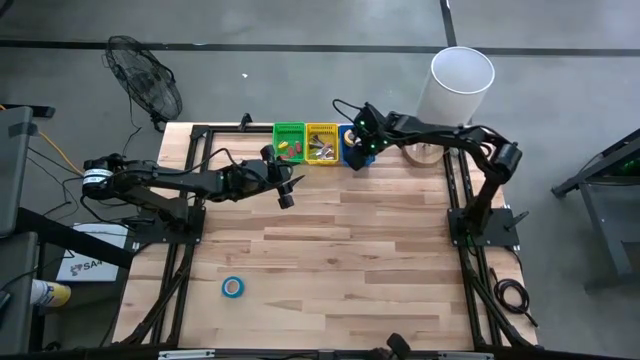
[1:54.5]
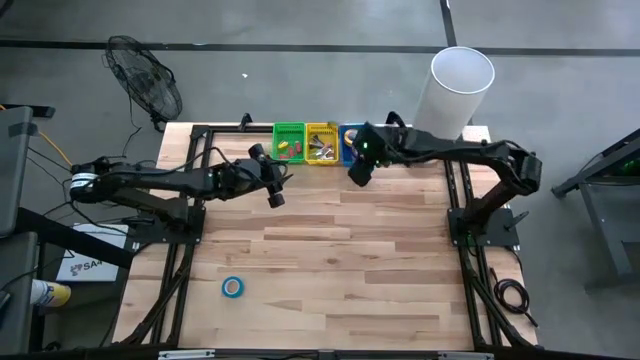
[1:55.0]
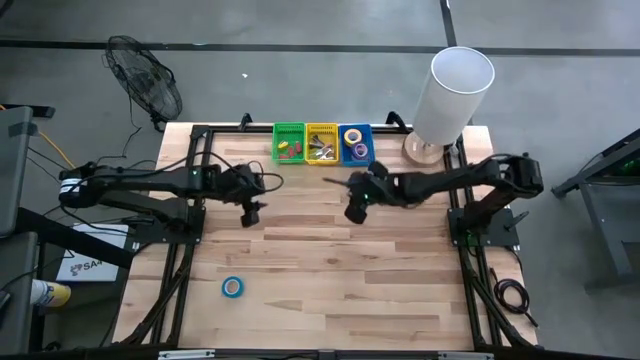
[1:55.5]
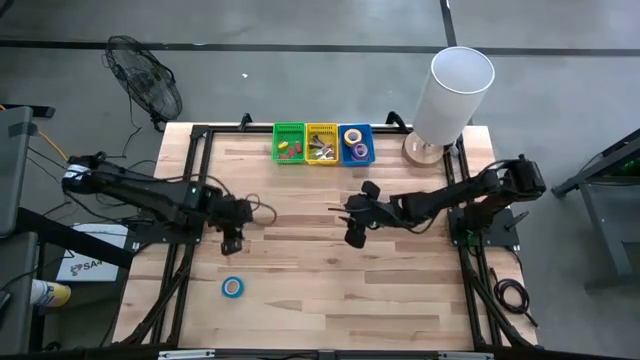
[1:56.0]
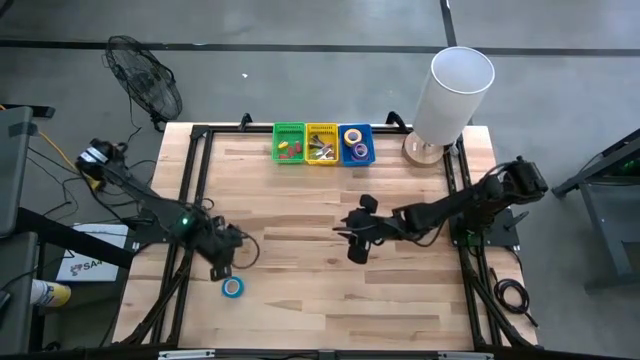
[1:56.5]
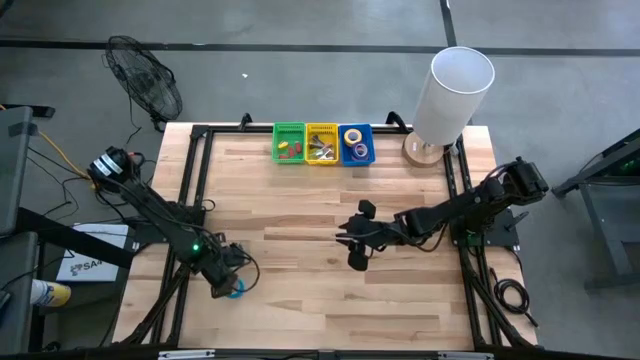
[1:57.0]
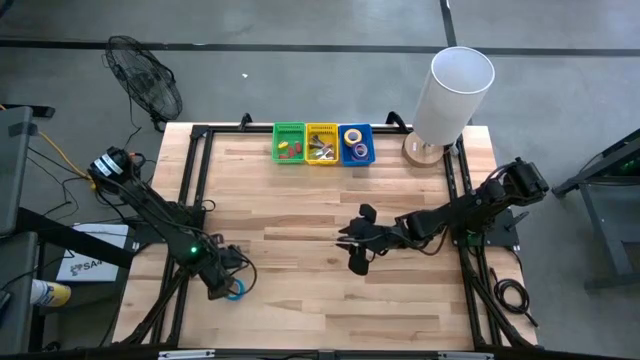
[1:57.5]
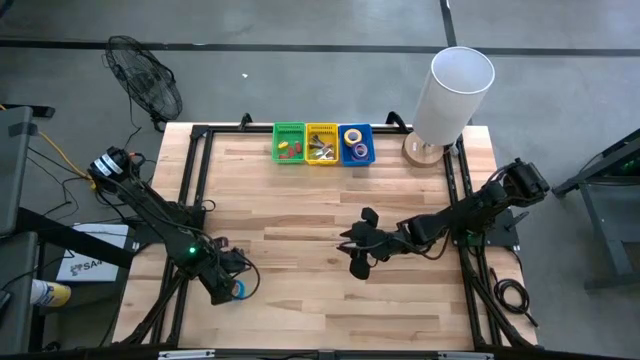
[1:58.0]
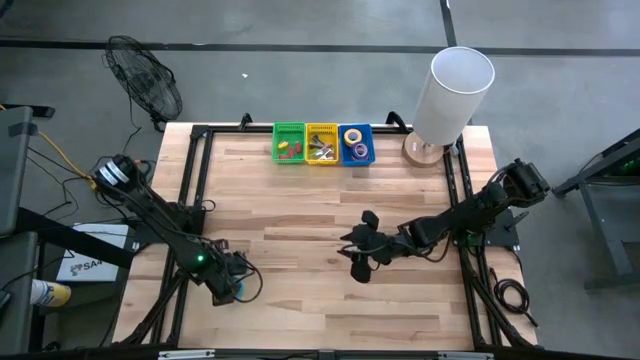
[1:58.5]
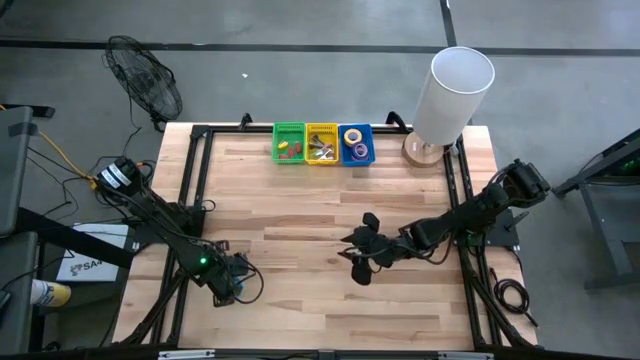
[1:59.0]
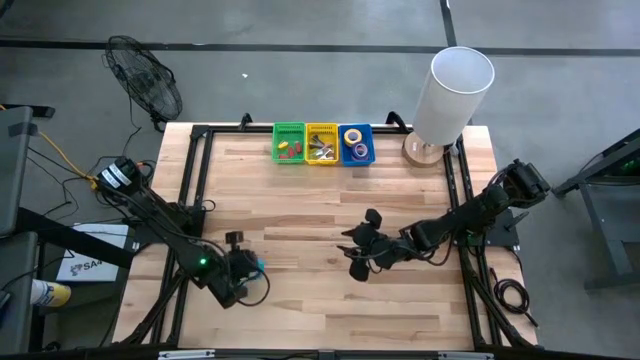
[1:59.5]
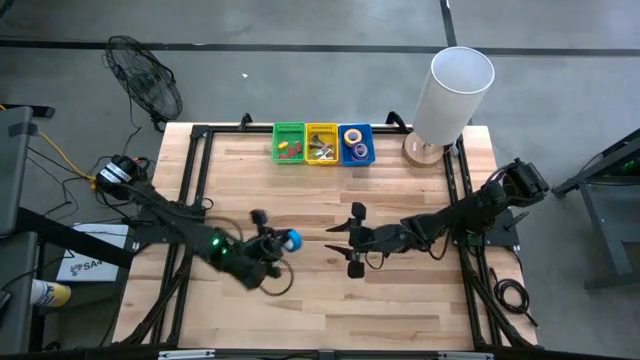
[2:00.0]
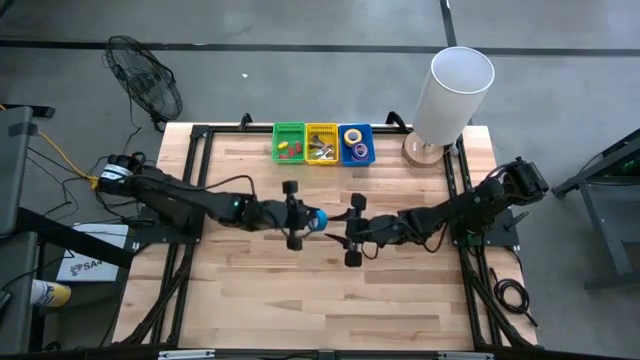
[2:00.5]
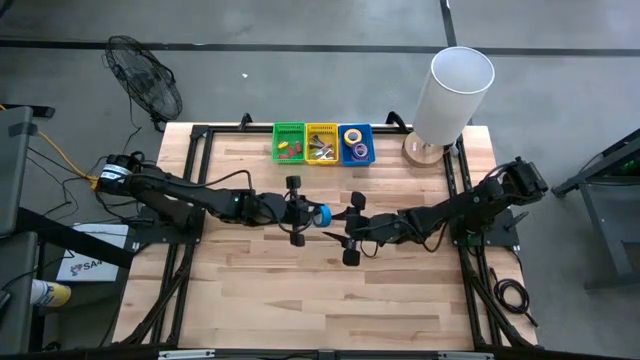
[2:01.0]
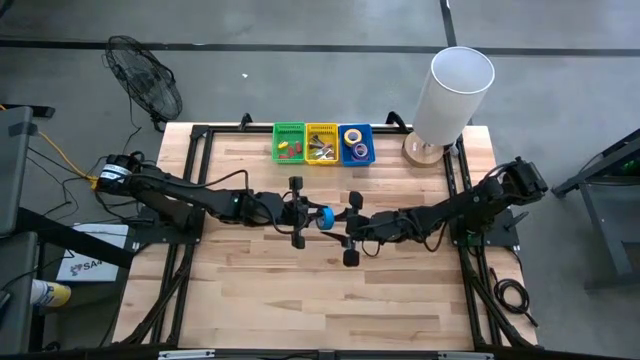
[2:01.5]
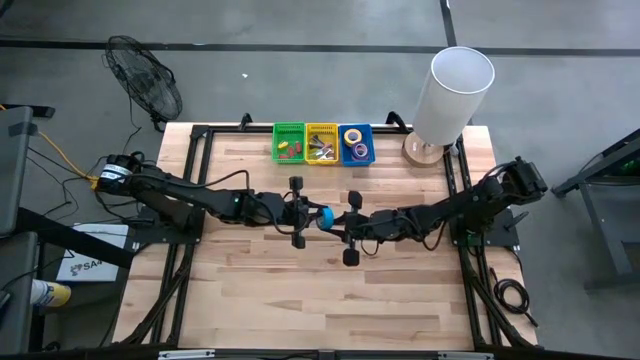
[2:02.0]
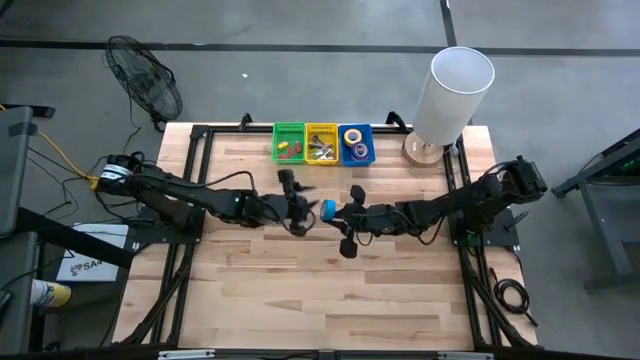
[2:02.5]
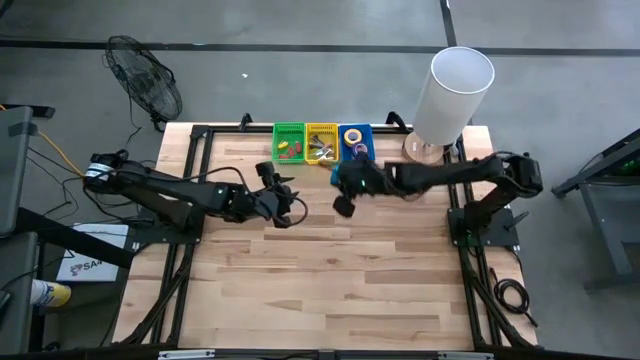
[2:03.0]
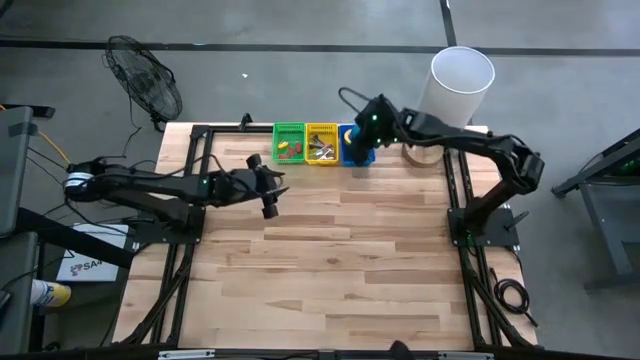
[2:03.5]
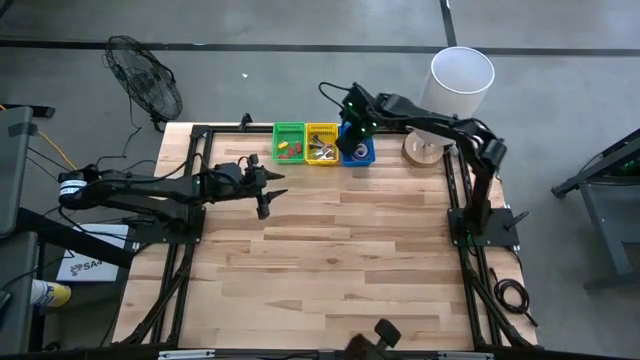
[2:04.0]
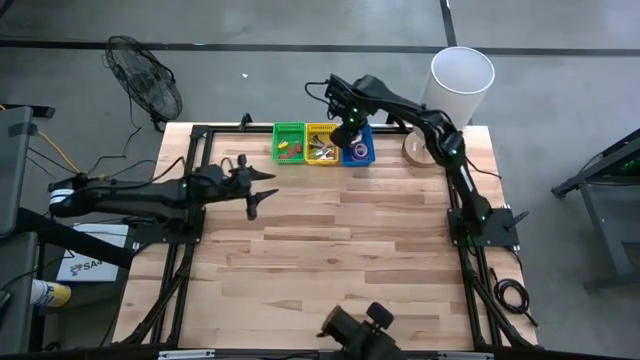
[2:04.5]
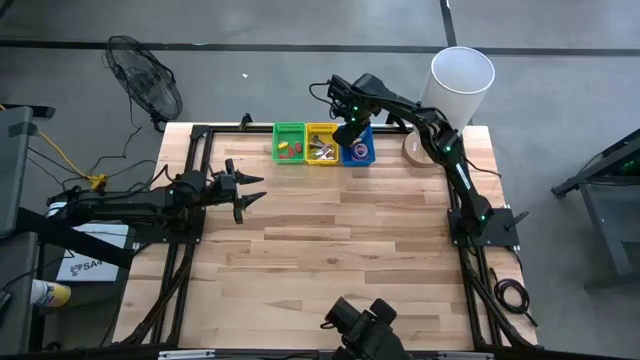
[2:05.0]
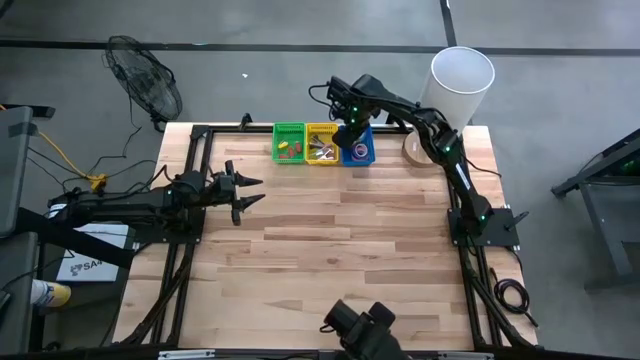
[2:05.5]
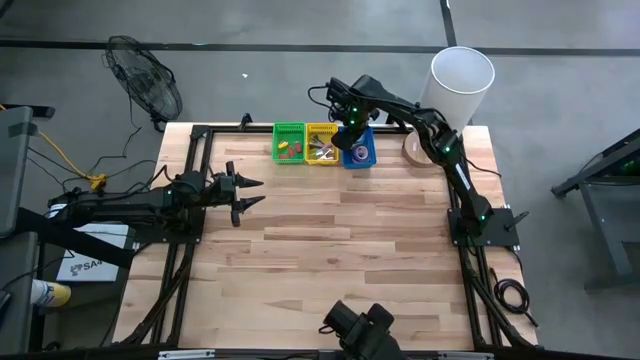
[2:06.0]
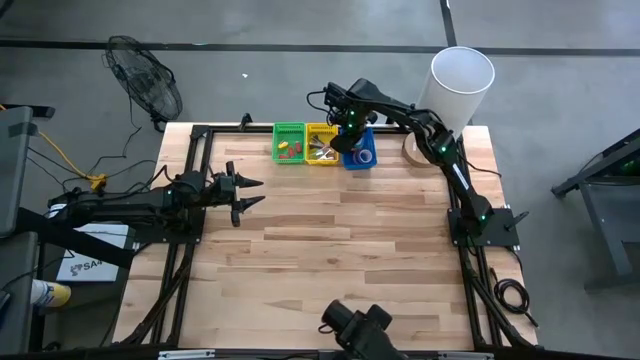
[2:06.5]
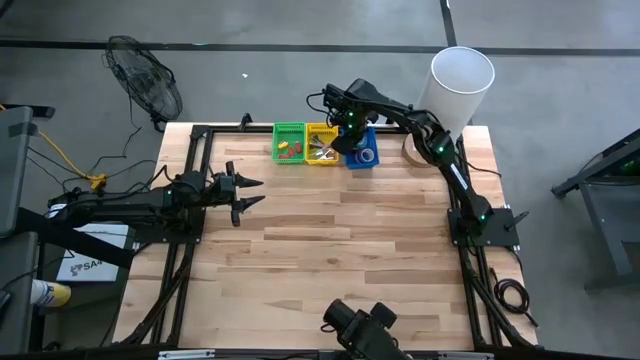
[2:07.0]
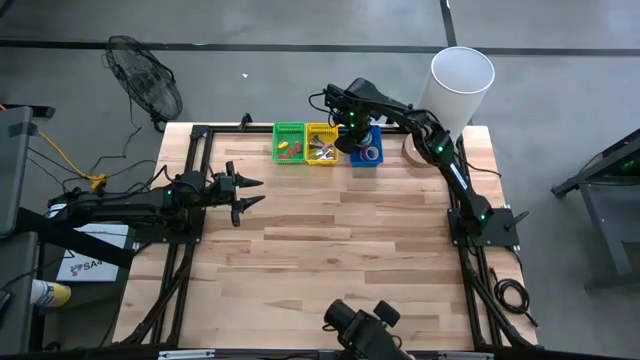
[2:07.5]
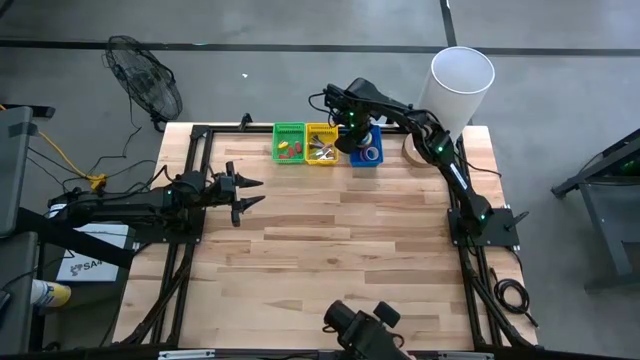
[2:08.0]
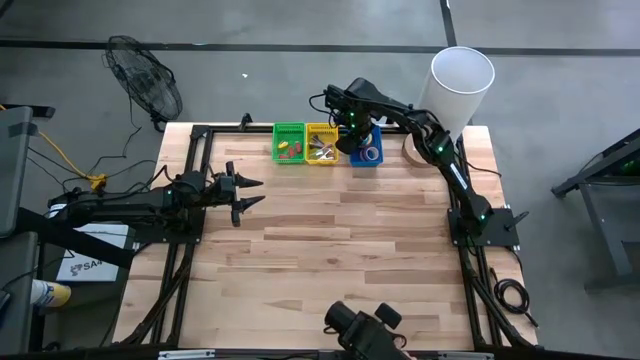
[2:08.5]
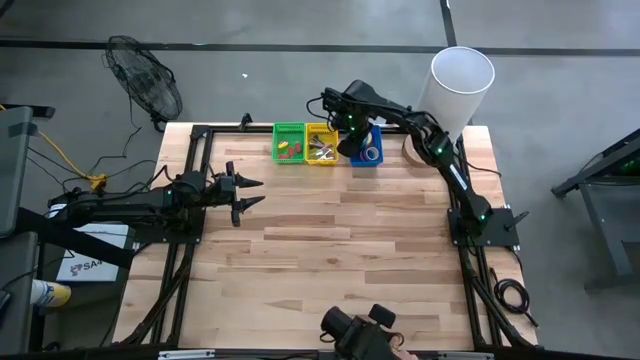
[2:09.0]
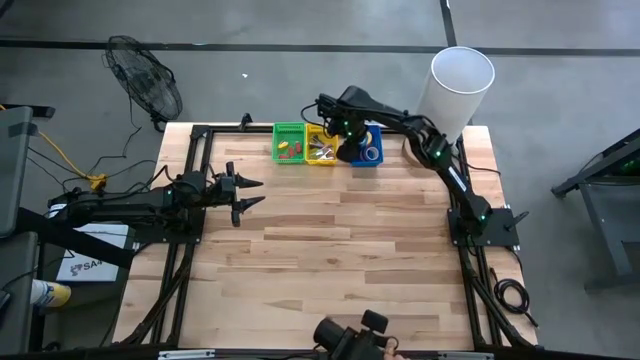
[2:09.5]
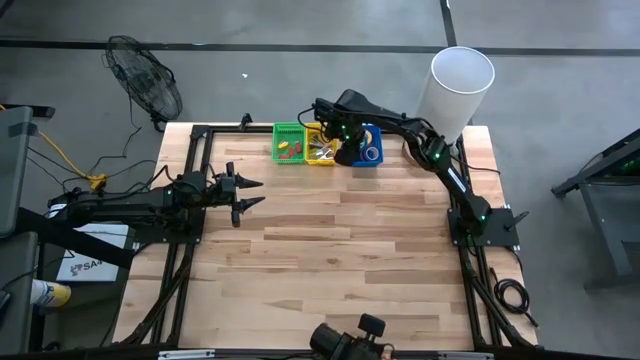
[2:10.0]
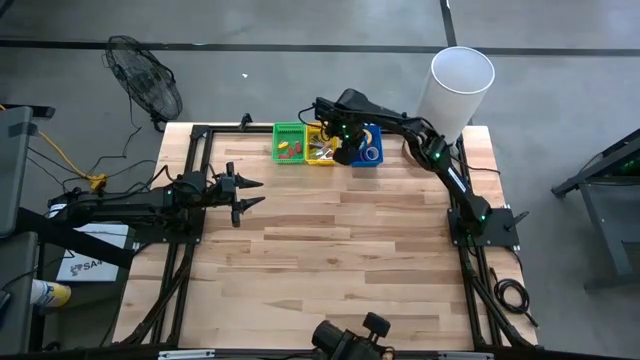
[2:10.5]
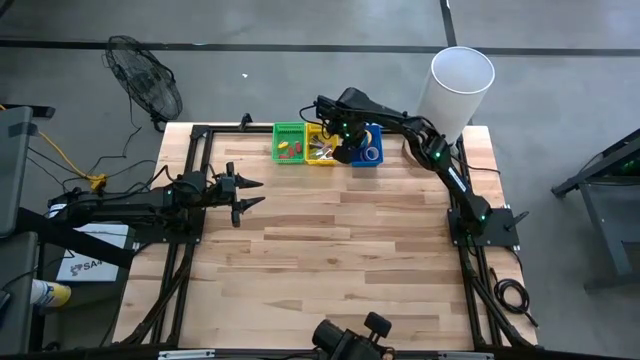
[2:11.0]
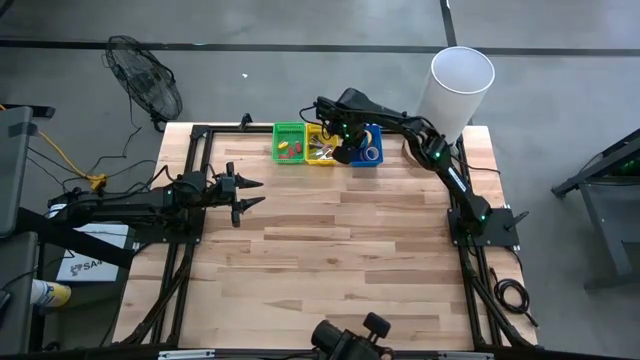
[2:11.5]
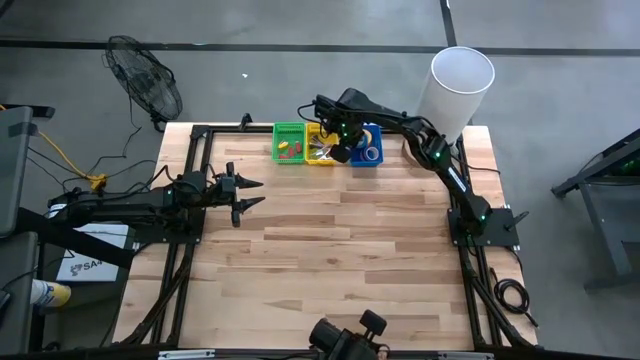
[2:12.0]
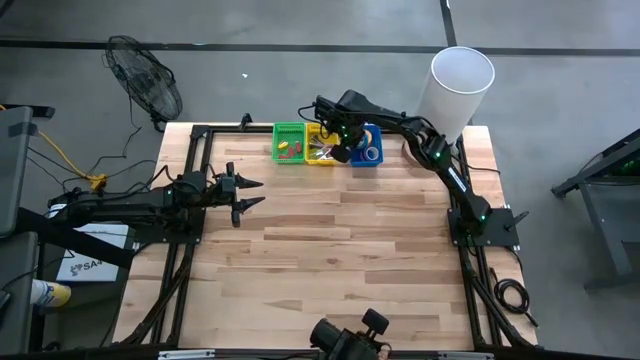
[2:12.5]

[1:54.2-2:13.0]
Task: Pick and place Stapler, Stapler remover, tape
Put the light blue tape into the blue bin

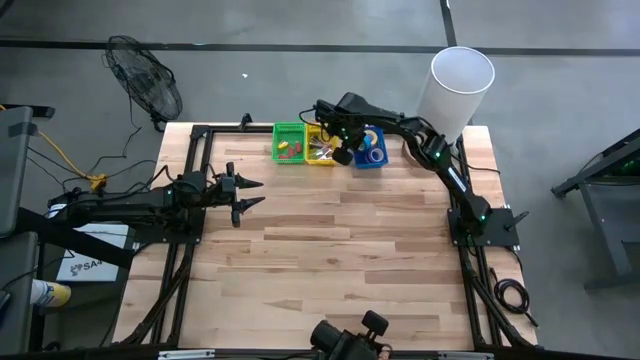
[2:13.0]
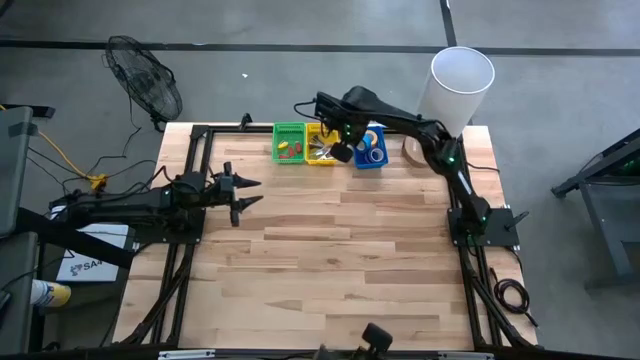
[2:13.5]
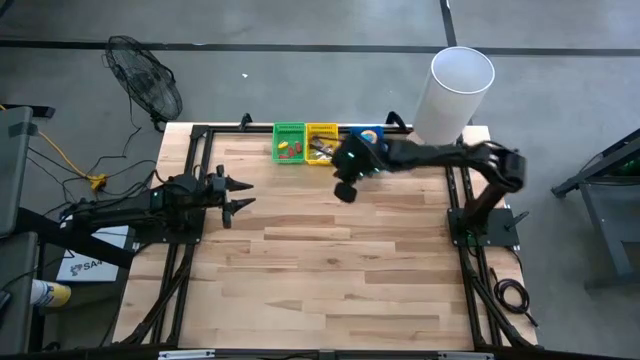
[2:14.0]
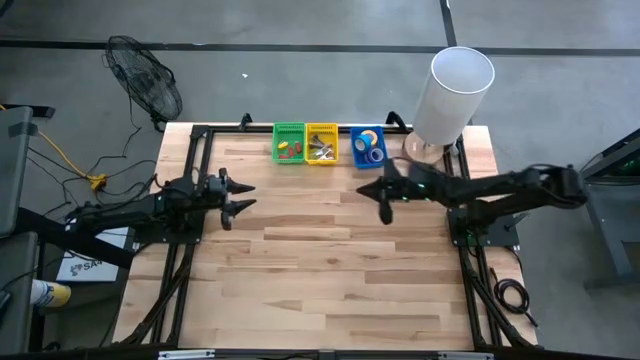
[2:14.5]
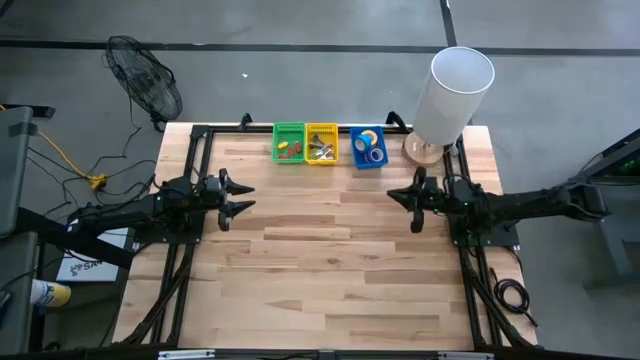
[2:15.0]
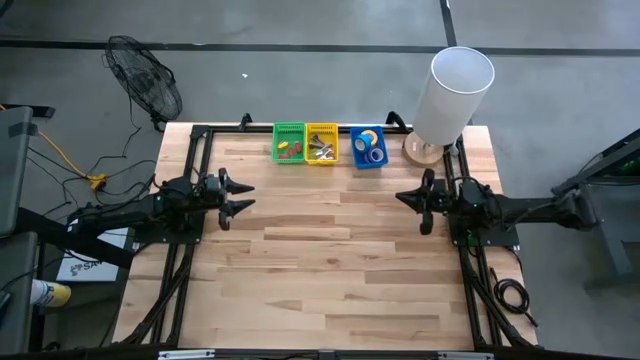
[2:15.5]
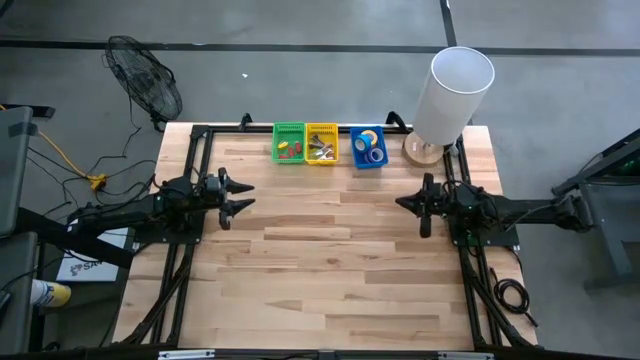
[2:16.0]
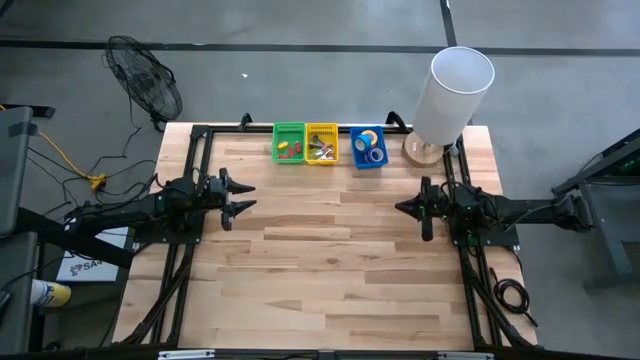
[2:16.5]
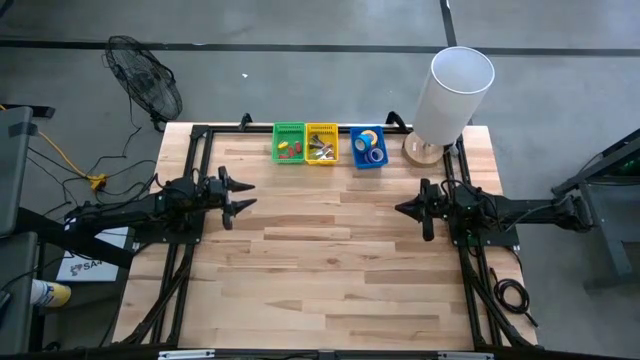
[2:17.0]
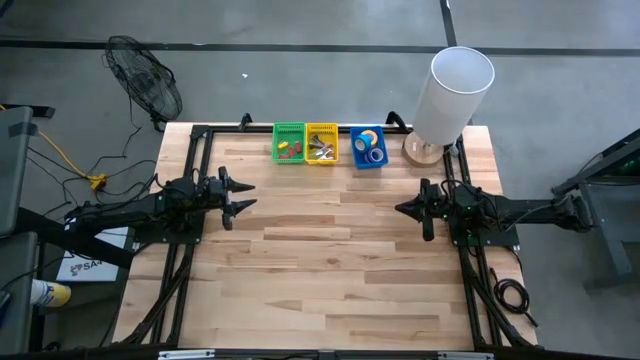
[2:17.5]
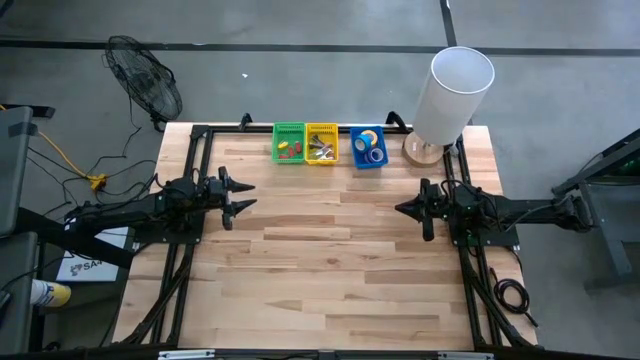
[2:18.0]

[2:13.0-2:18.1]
Return to Home Position
